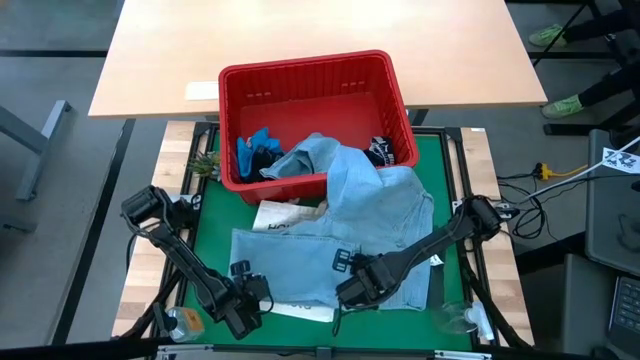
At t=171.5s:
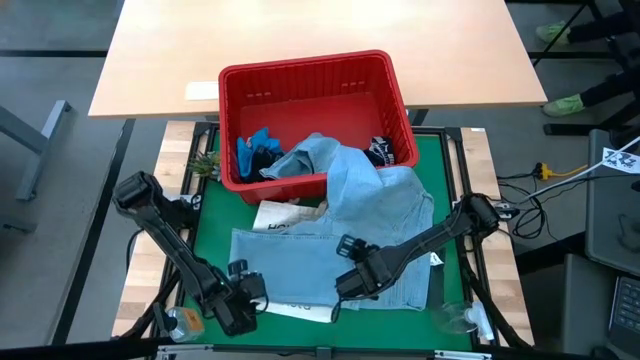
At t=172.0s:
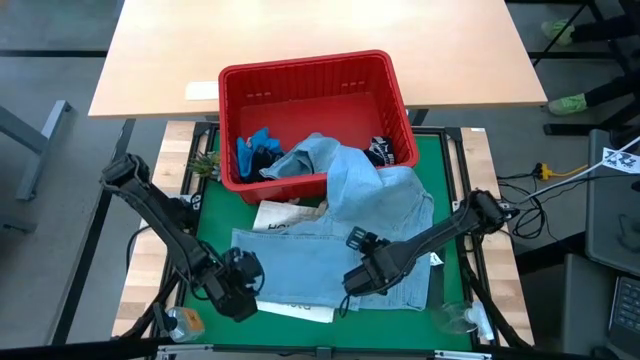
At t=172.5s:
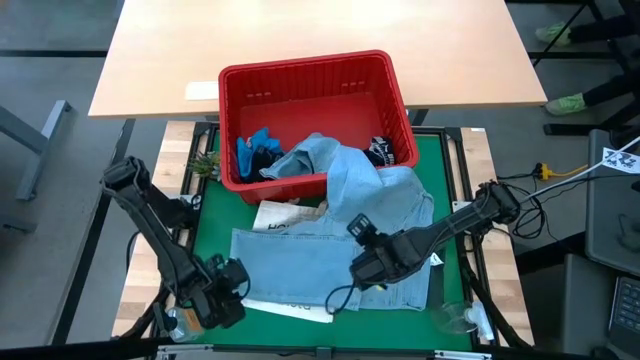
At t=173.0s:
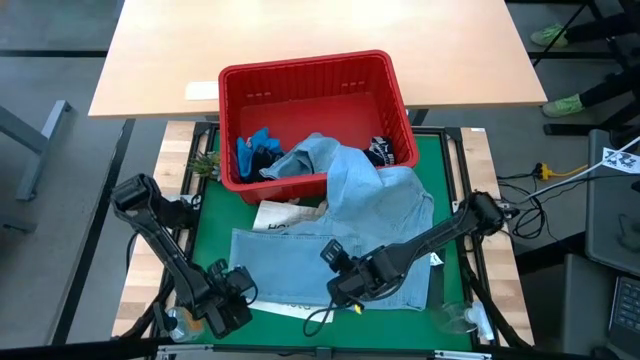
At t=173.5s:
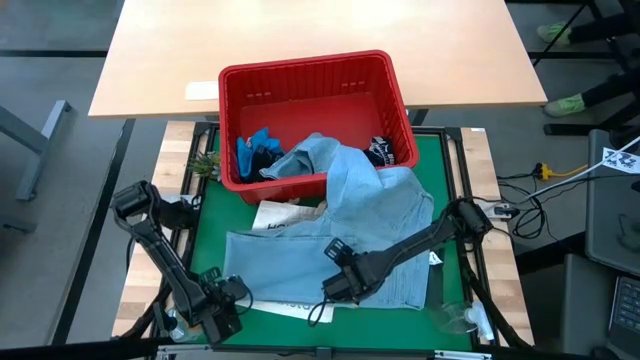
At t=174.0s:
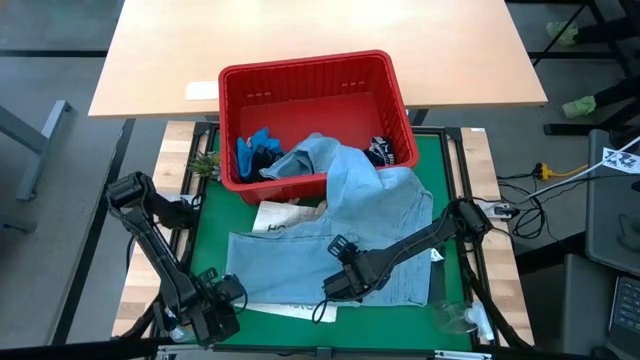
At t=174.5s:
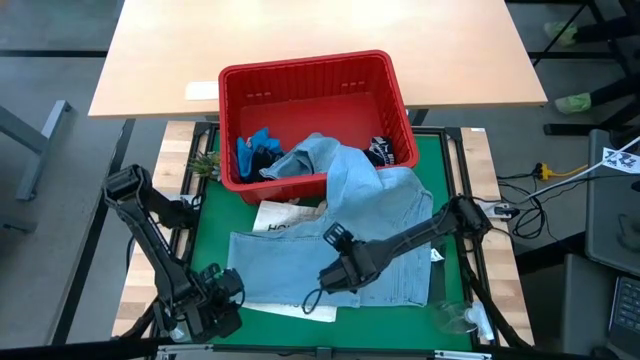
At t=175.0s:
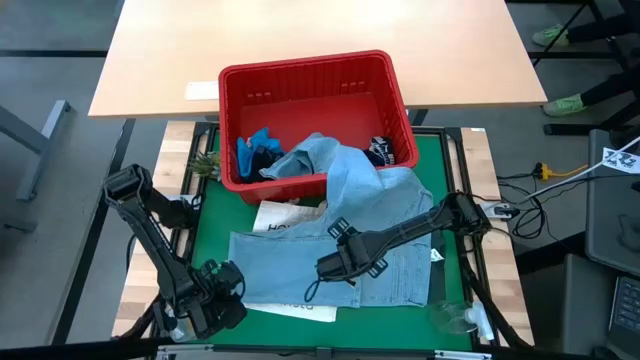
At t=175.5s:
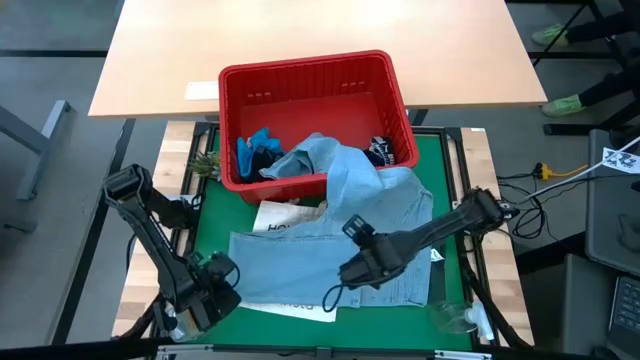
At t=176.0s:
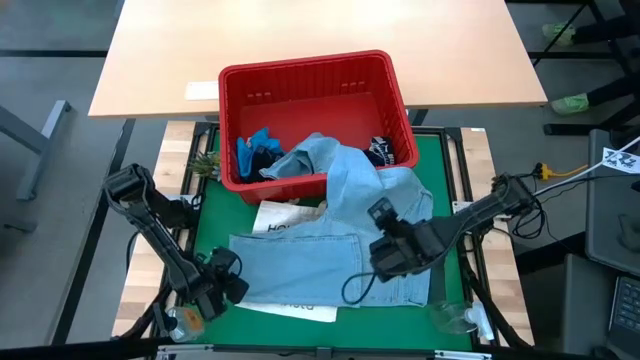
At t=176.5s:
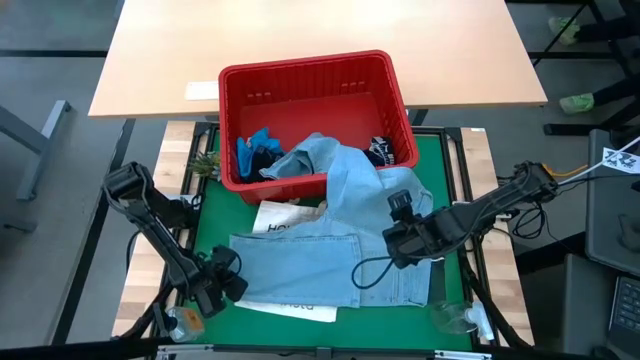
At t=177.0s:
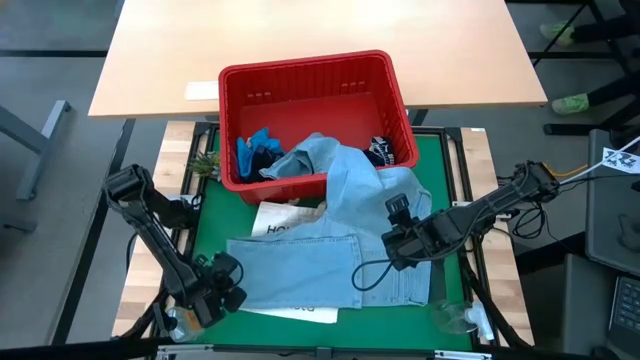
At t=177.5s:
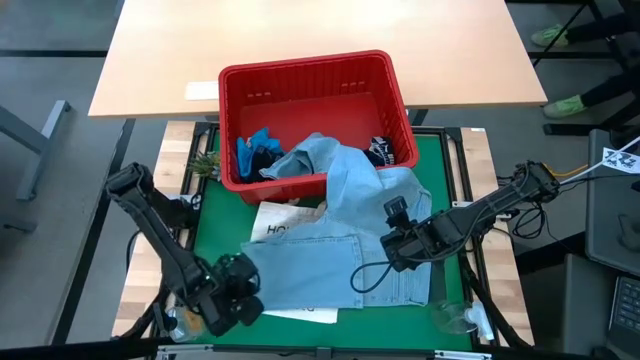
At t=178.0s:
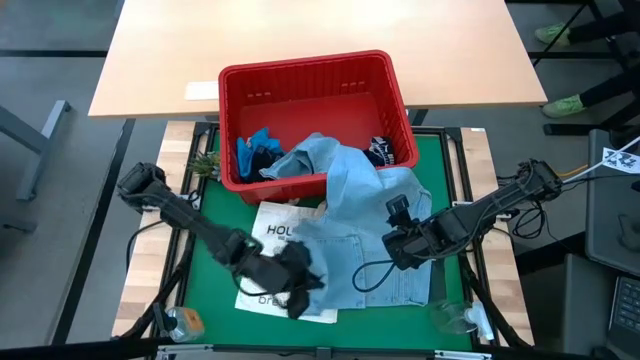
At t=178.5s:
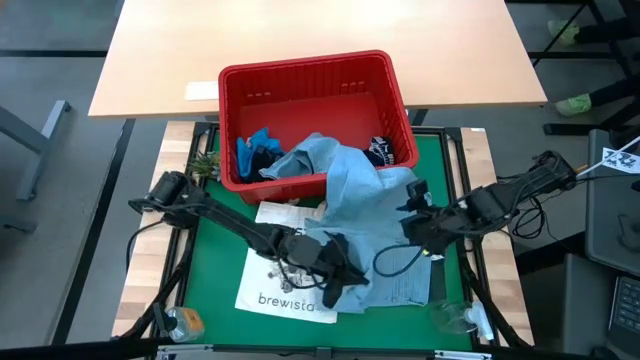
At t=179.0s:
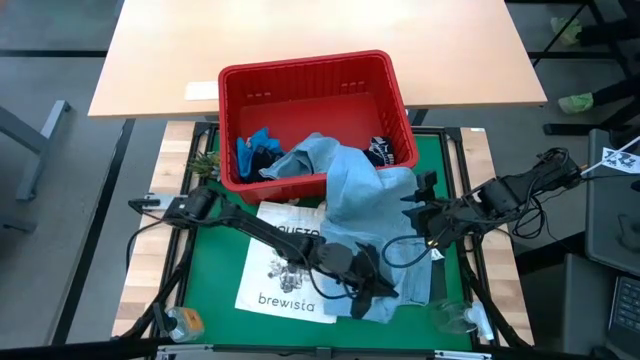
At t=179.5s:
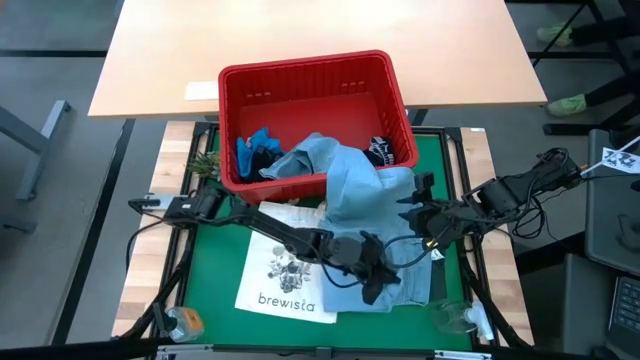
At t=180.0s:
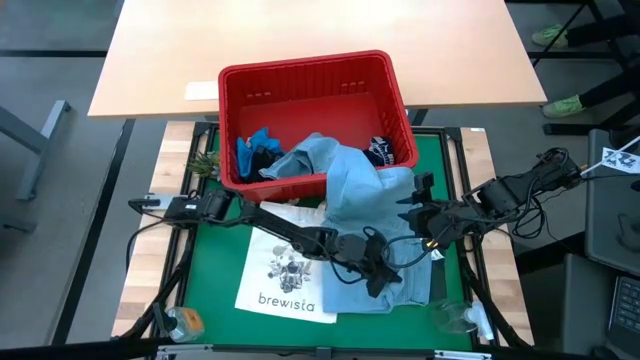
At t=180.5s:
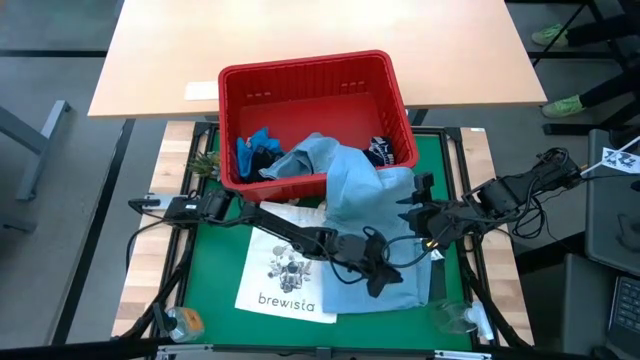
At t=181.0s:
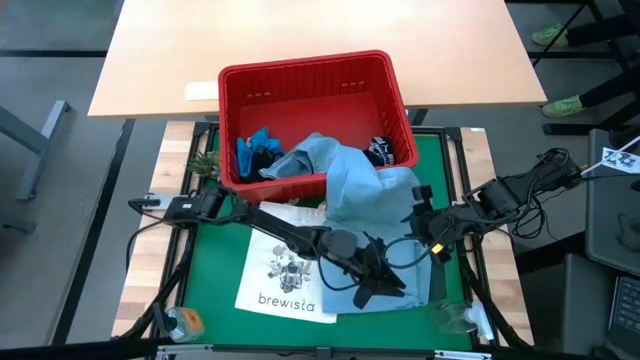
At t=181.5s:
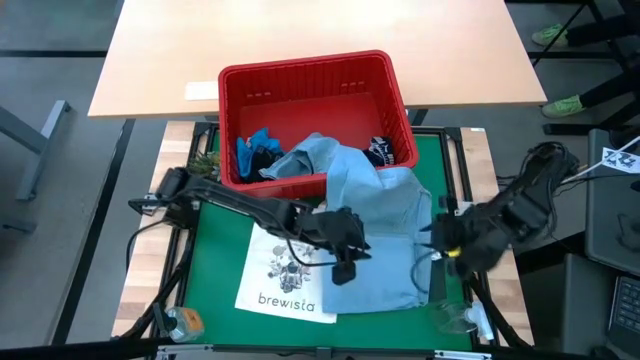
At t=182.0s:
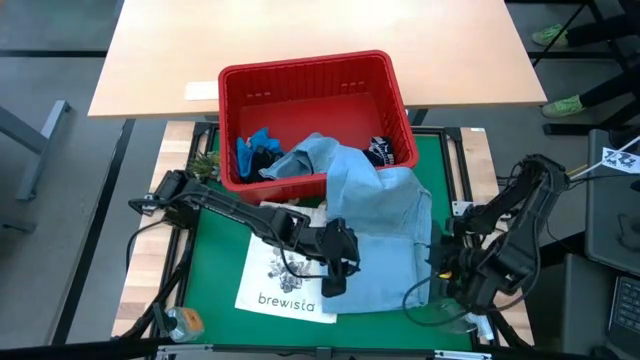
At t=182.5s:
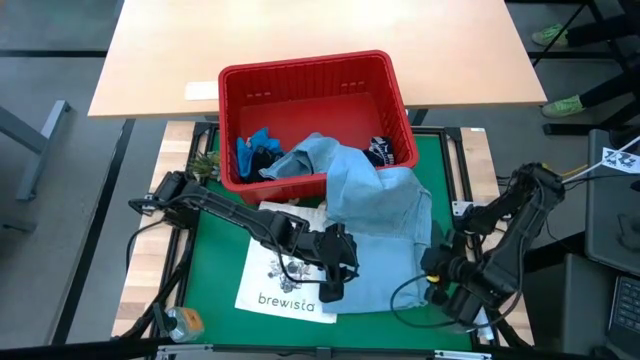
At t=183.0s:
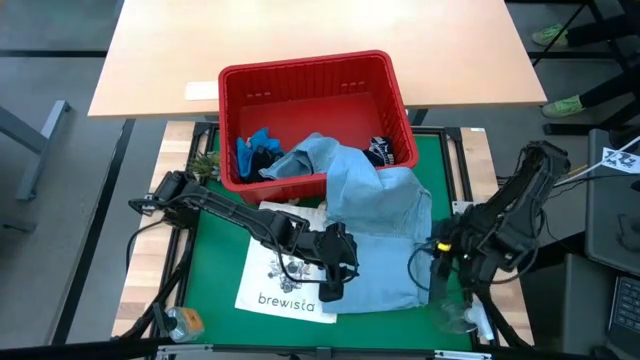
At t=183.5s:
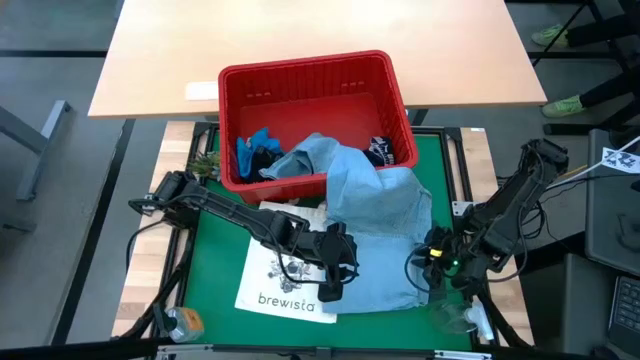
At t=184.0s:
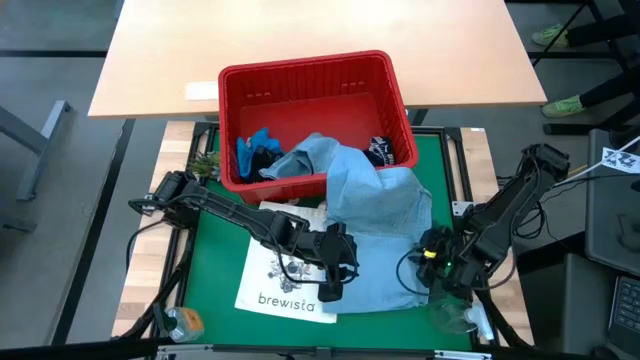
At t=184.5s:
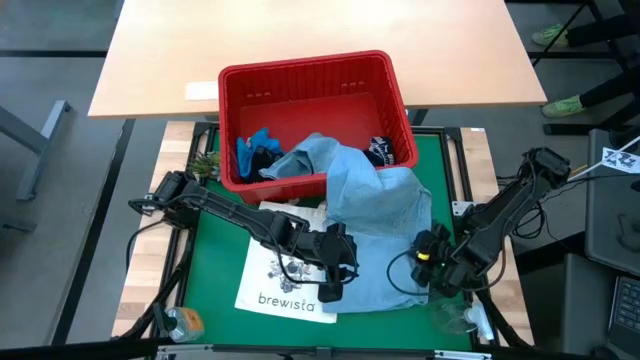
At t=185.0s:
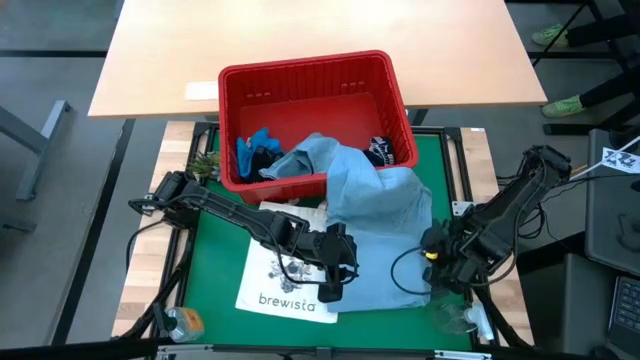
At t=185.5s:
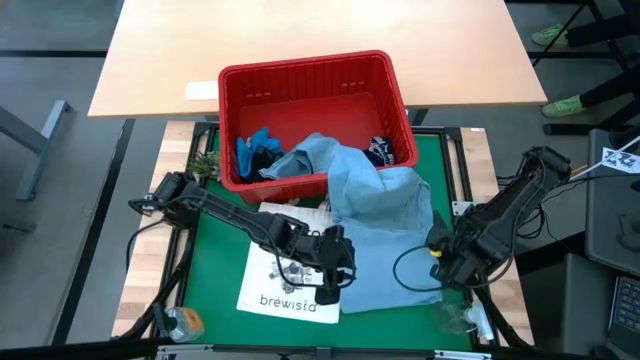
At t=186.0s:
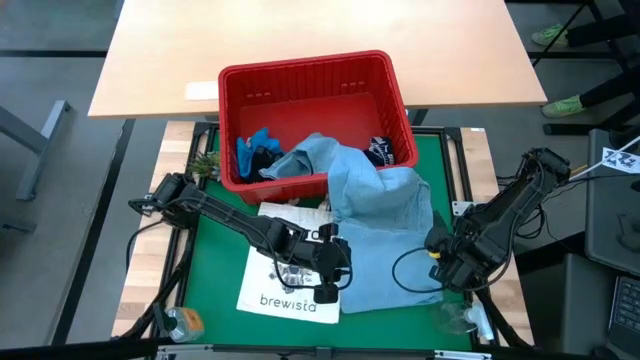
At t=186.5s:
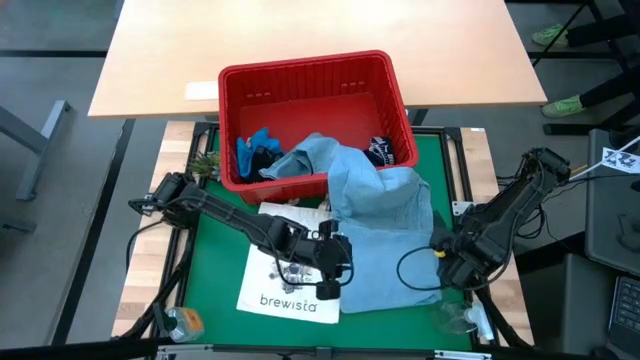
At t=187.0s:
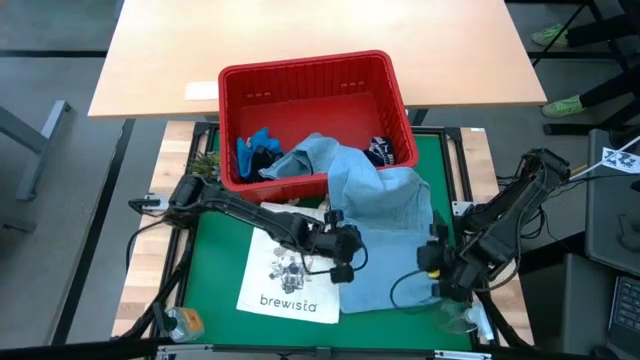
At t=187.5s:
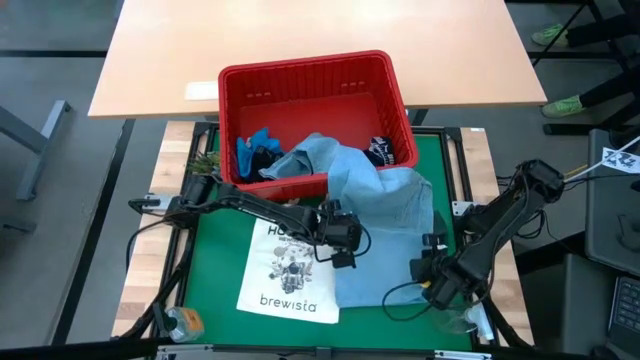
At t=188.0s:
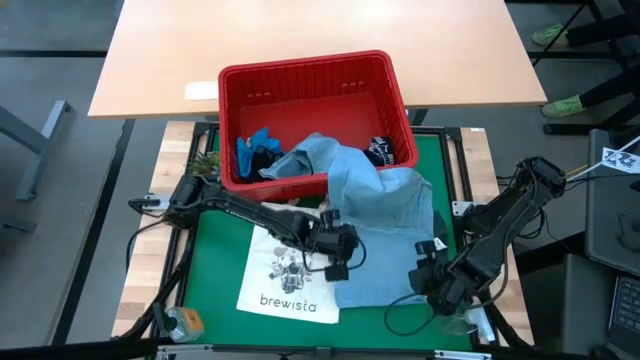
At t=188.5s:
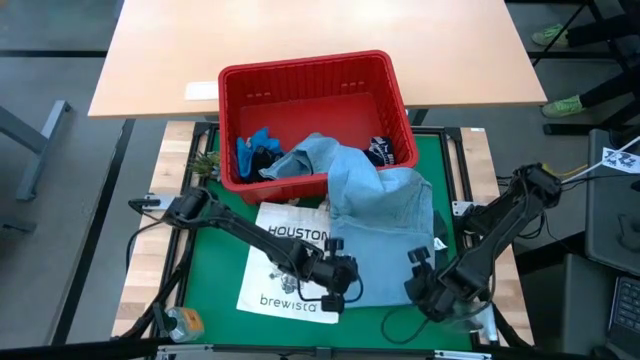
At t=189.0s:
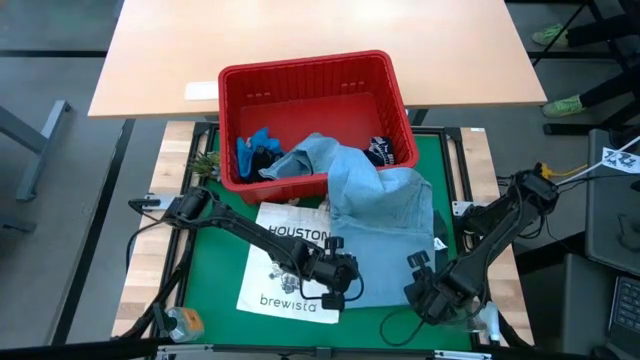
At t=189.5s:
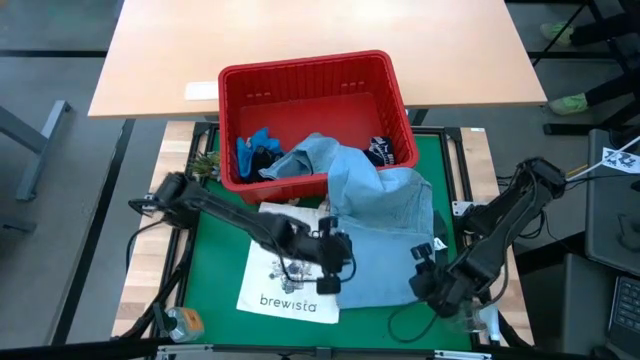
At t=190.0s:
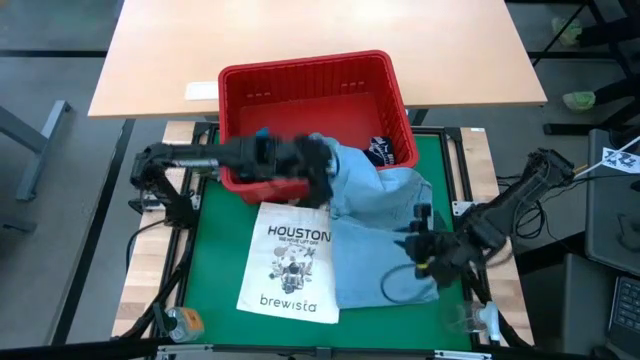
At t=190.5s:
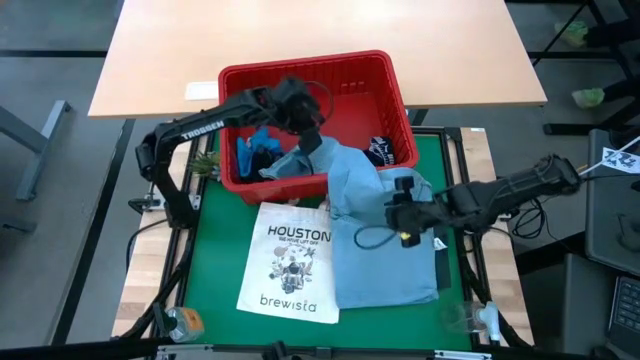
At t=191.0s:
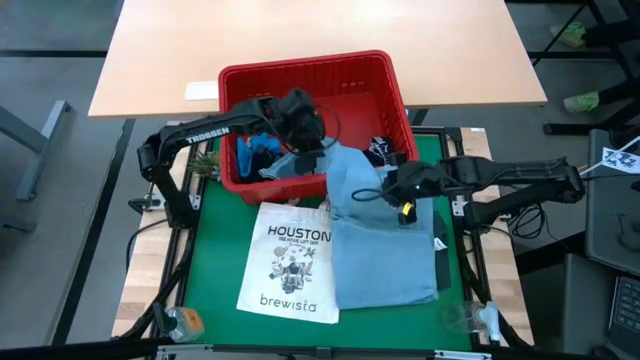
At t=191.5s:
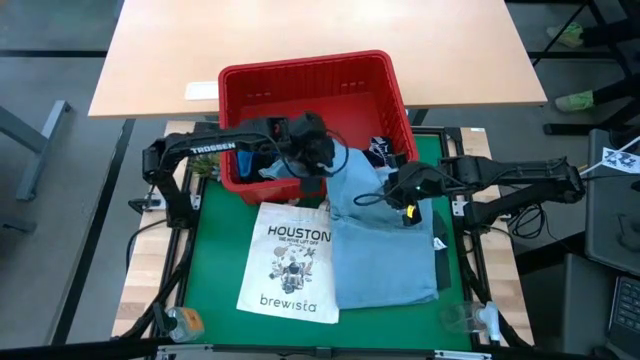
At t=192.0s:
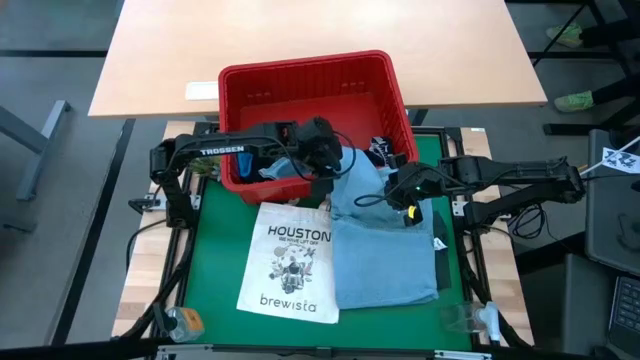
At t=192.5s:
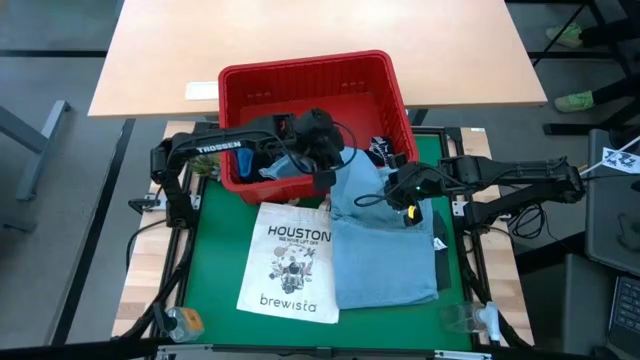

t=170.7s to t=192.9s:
Task: Fold Laundry from Bin
Fold the light blue jeans
